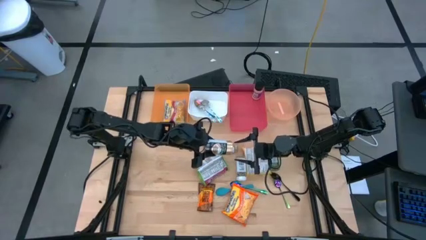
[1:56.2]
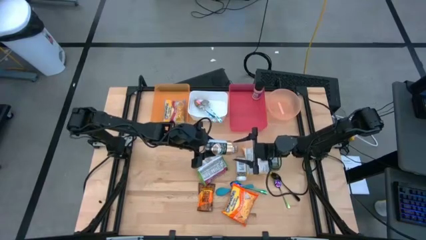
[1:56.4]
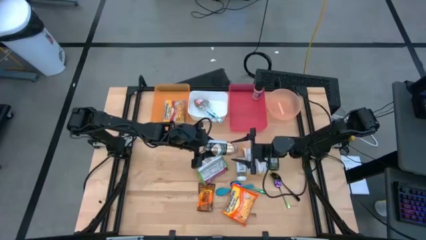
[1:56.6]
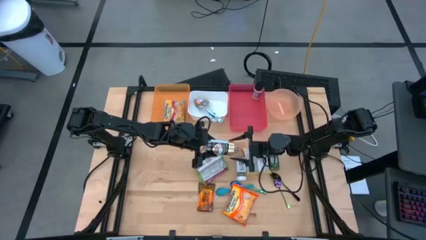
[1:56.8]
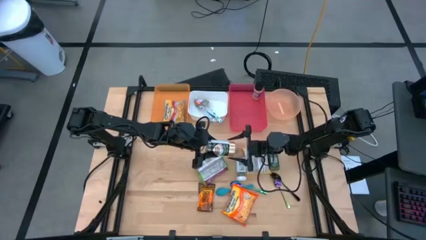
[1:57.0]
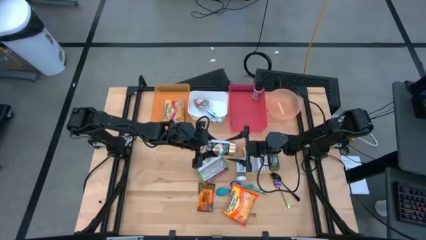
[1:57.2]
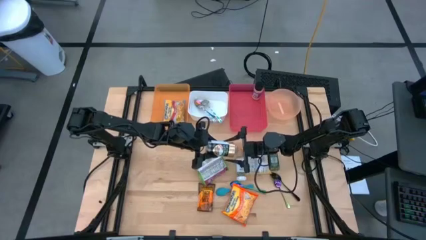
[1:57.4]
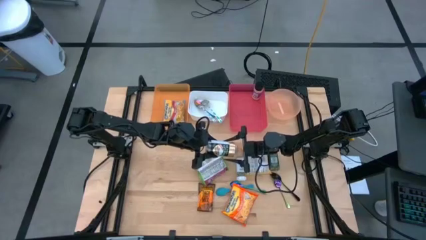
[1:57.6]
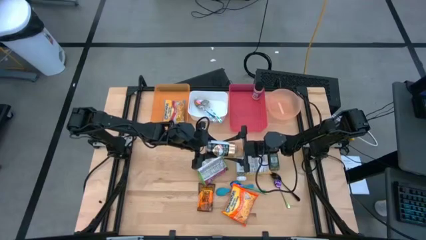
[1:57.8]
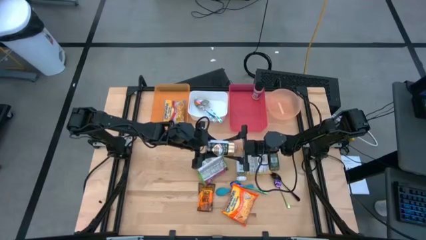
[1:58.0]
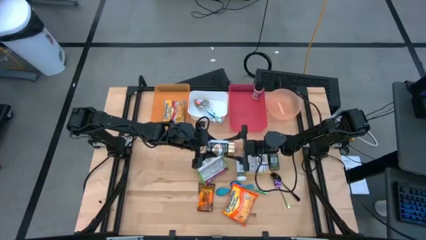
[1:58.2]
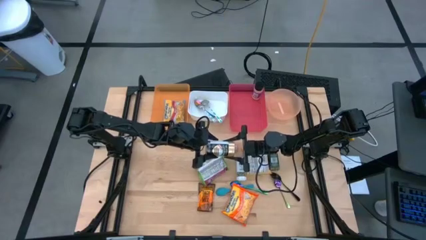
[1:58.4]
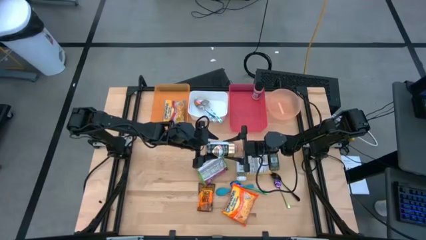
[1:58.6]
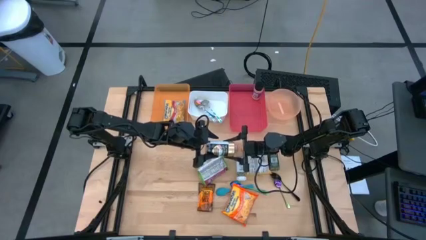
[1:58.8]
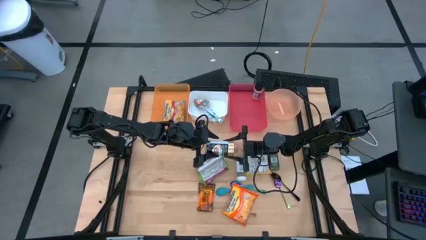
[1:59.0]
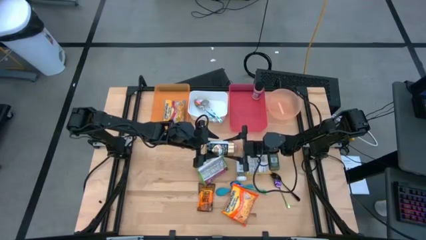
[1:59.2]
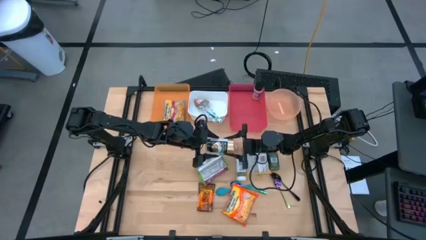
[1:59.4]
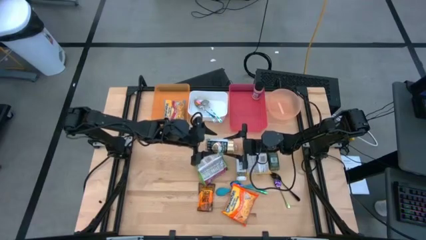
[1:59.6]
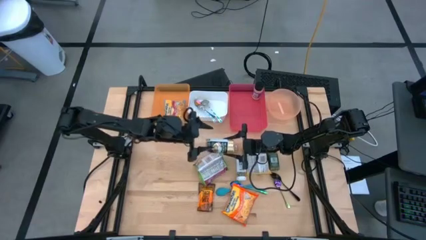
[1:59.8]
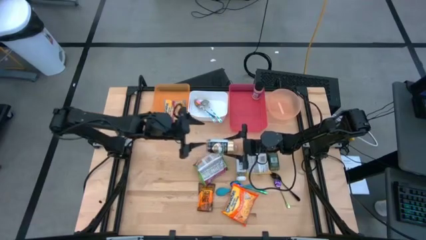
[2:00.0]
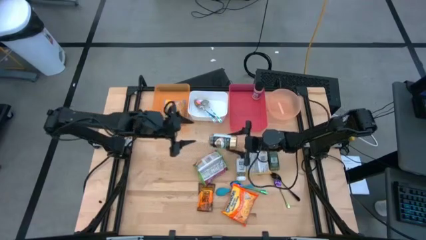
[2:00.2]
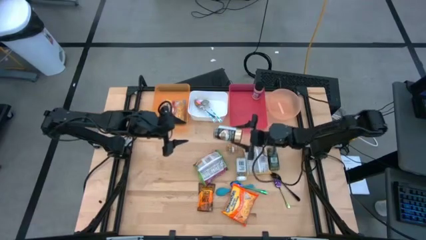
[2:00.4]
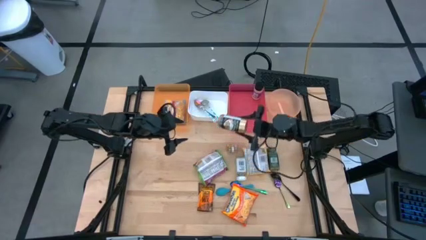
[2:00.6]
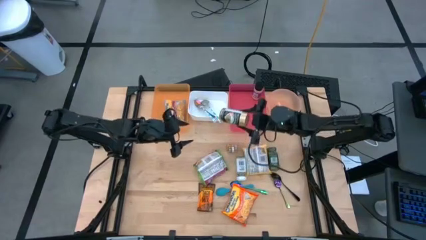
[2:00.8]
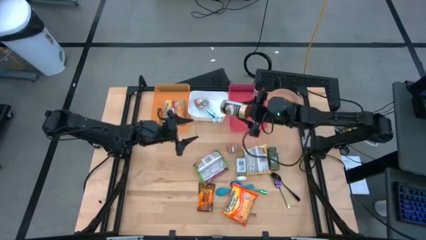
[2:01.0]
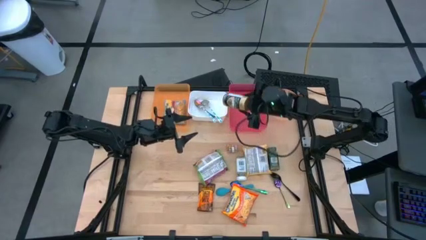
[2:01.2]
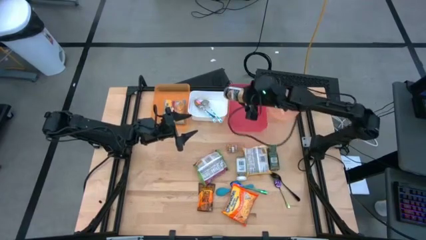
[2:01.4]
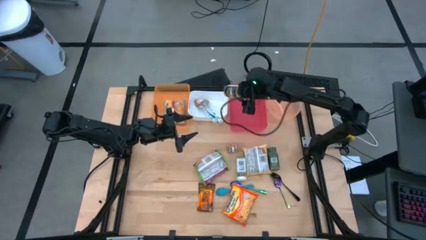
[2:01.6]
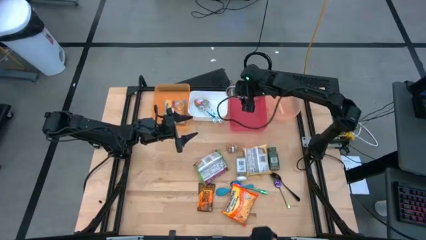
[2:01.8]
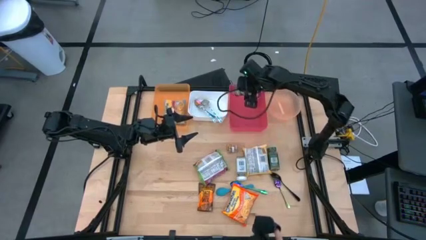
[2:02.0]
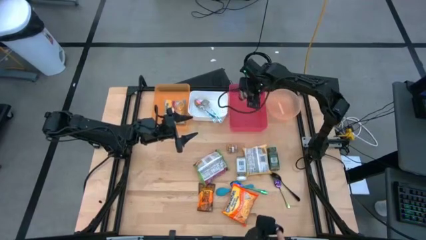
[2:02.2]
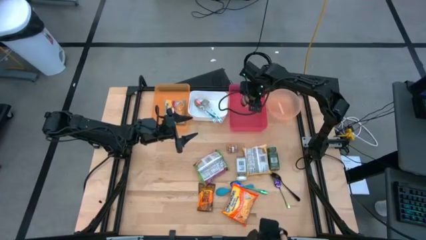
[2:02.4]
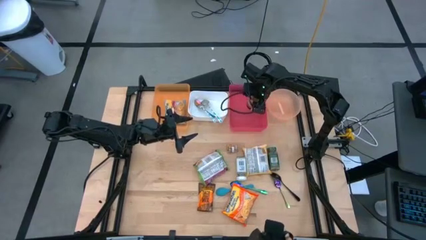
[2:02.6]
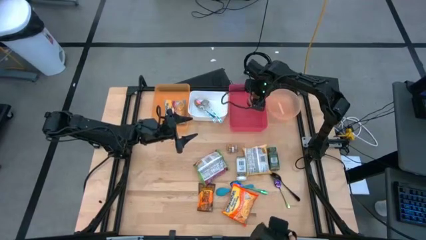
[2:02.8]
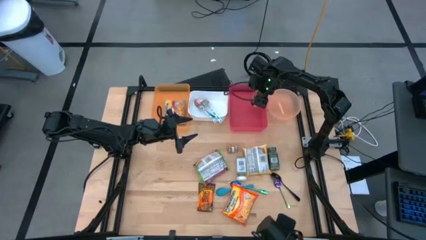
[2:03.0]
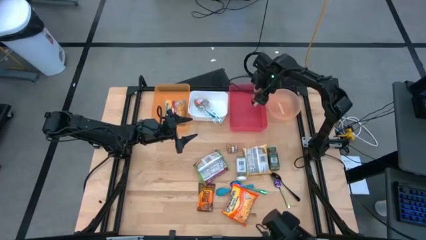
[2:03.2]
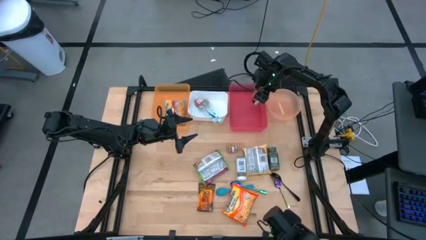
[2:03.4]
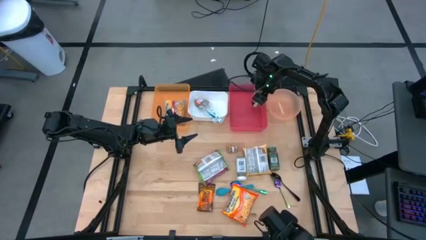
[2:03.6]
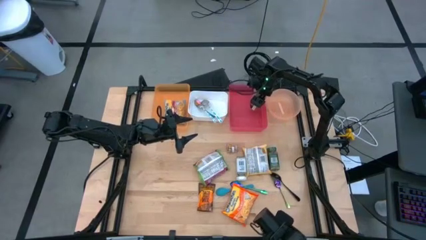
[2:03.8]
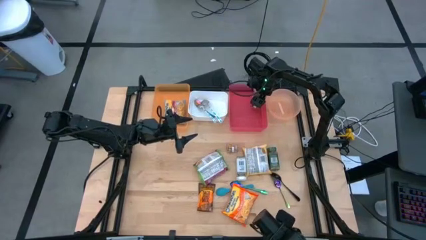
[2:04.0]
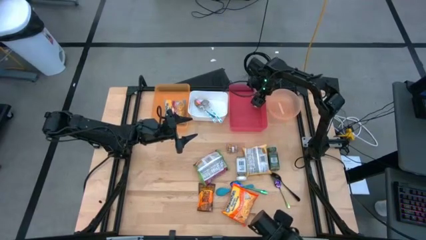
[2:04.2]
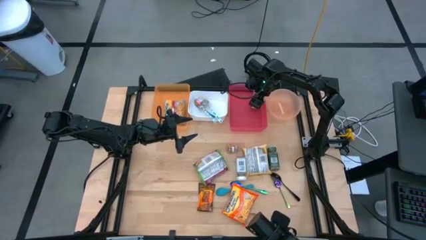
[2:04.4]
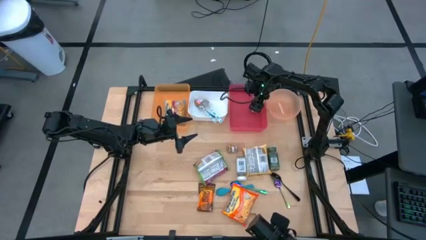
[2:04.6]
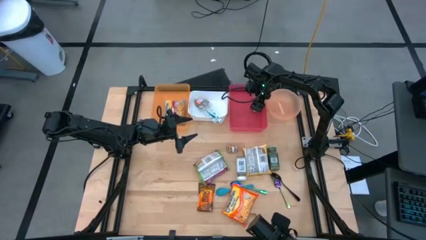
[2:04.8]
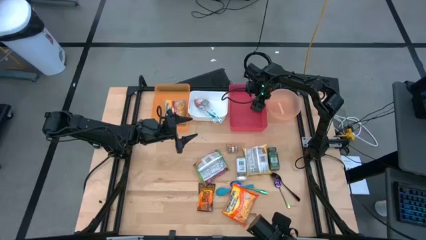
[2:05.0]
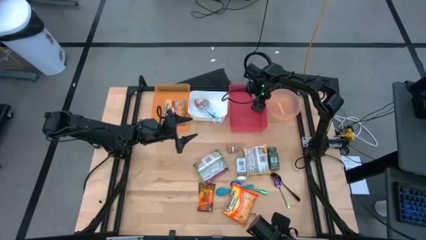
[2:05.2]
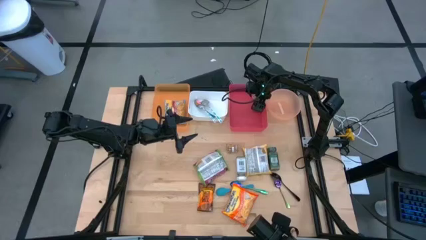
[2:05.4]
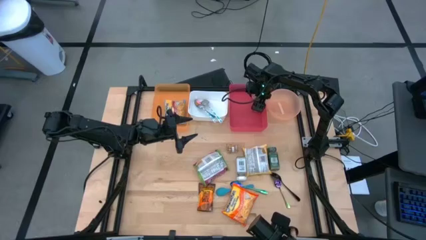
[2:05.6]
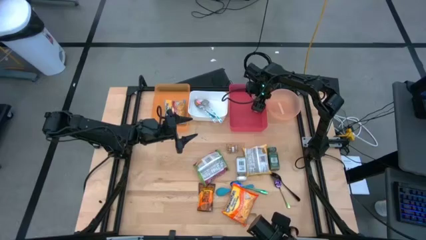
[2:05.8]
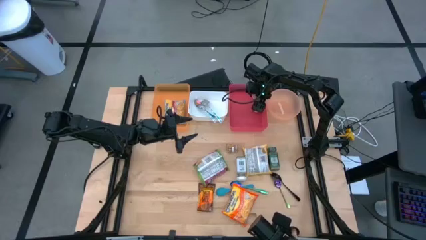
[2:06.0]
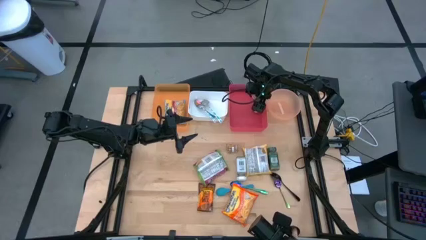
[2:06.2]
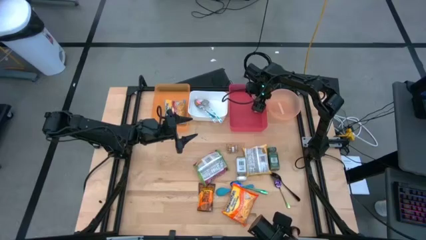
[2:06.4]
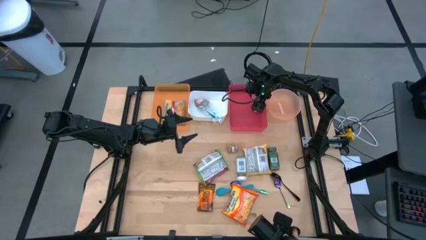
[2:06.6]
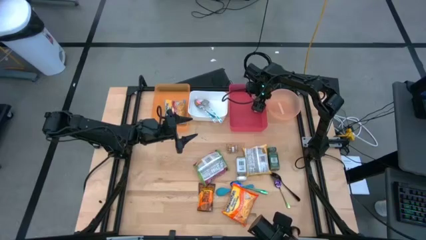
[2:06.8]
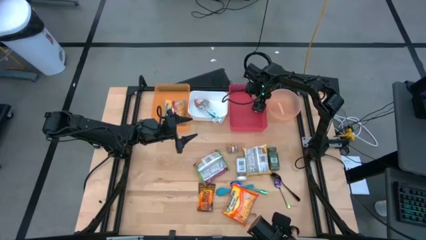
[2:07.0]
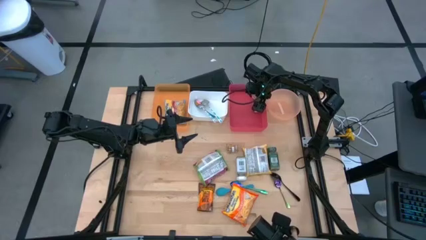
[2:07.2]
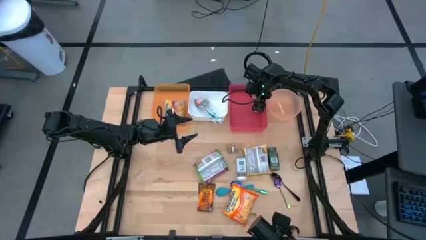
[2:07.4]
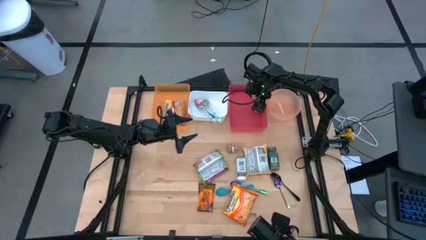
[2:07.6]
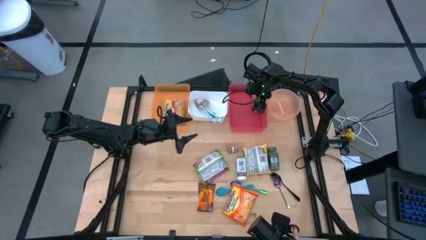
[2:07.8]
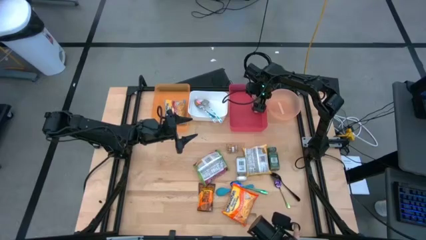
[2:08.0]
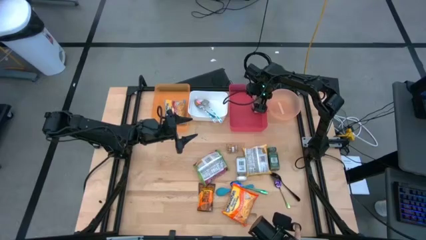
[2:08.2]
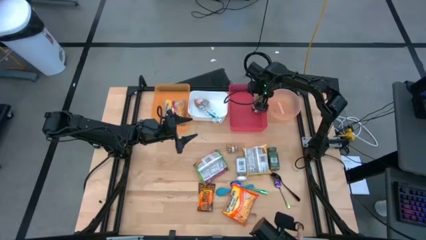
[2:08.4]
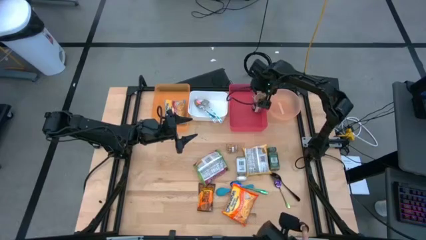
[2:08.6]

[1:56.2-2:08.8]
Task: Pick & Place Food Item
Put the gold seasoning bottle into the red bin
